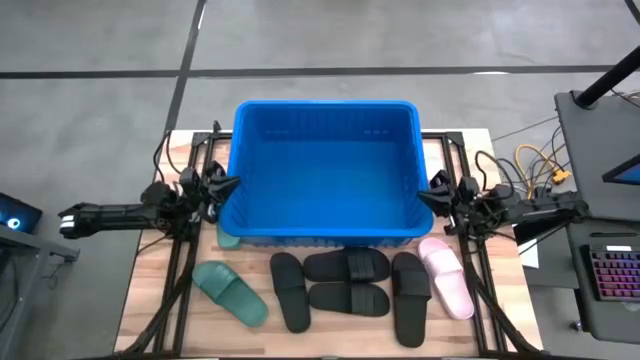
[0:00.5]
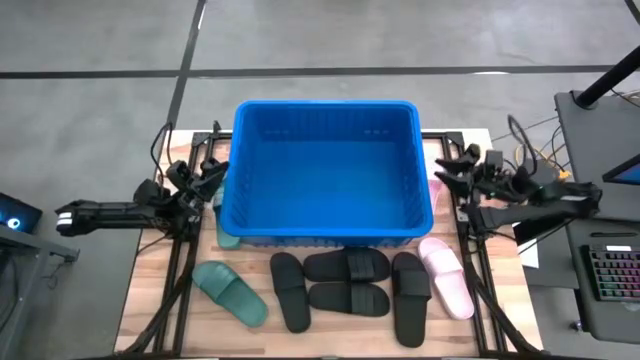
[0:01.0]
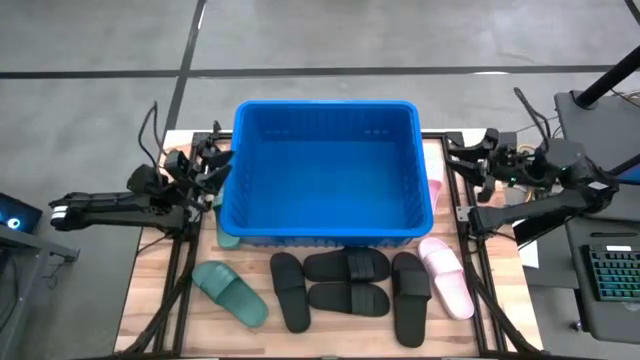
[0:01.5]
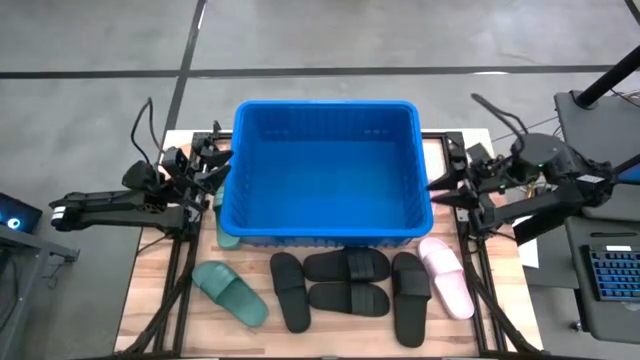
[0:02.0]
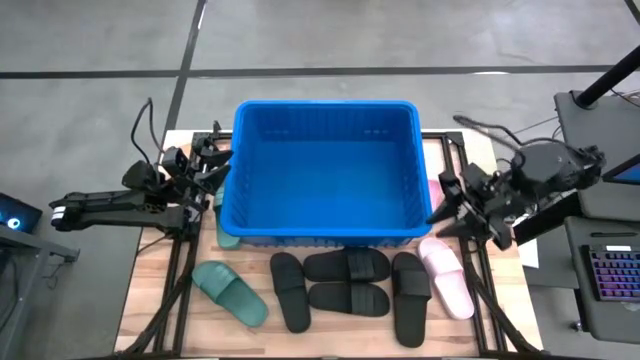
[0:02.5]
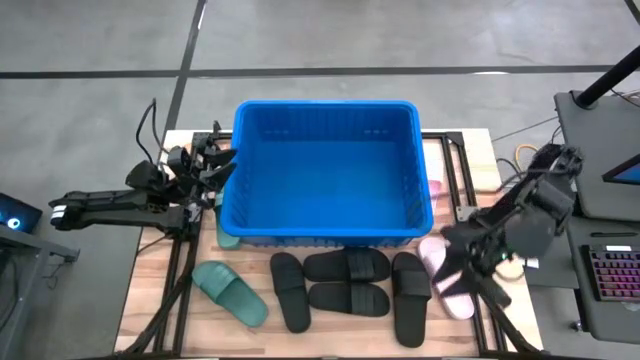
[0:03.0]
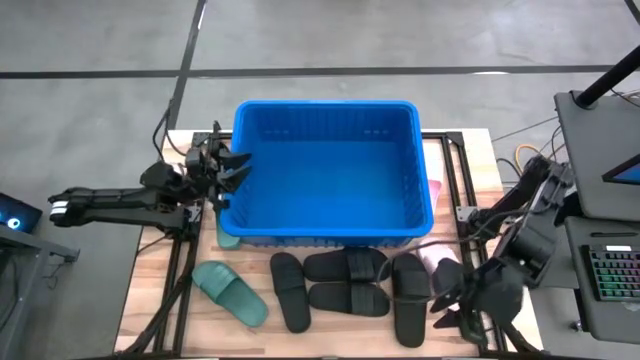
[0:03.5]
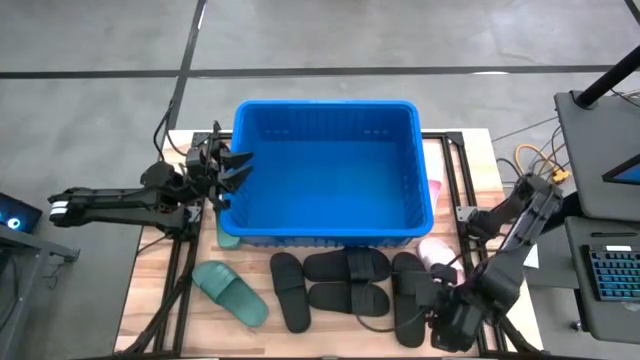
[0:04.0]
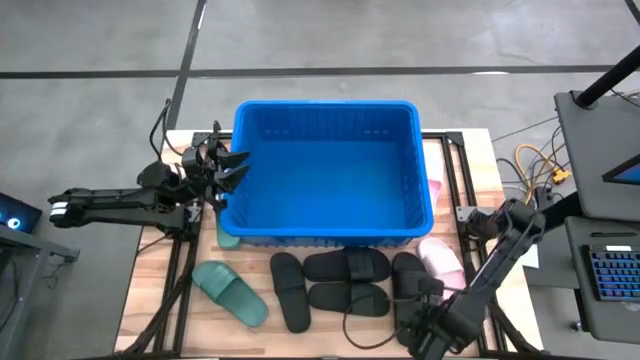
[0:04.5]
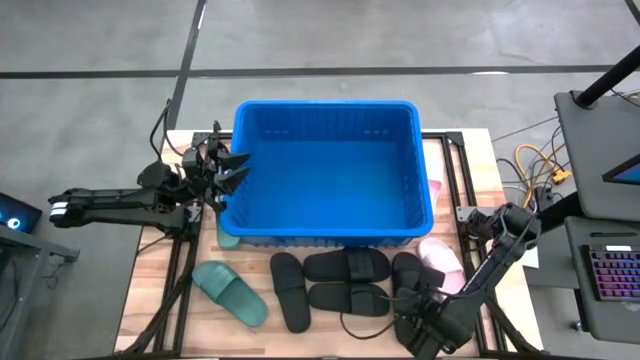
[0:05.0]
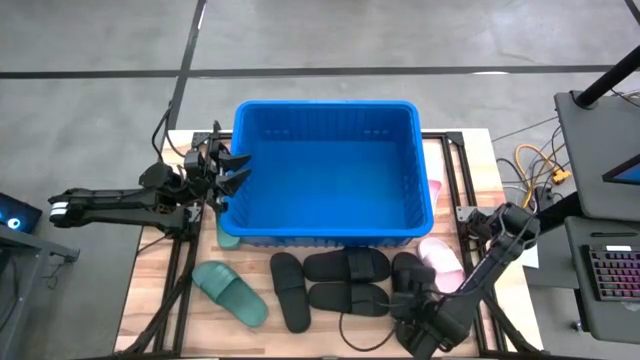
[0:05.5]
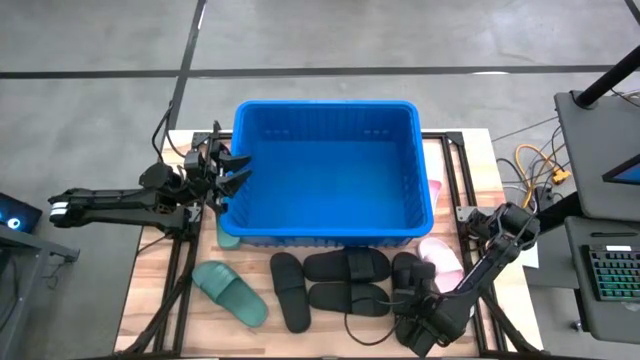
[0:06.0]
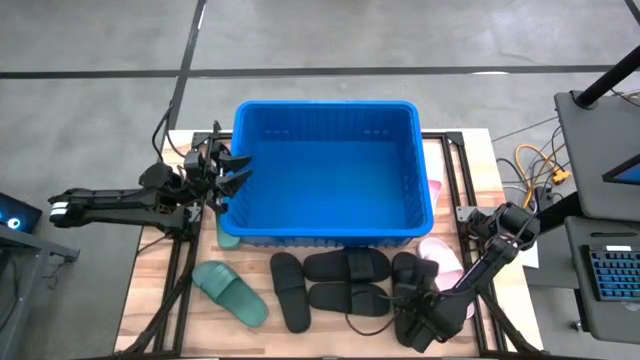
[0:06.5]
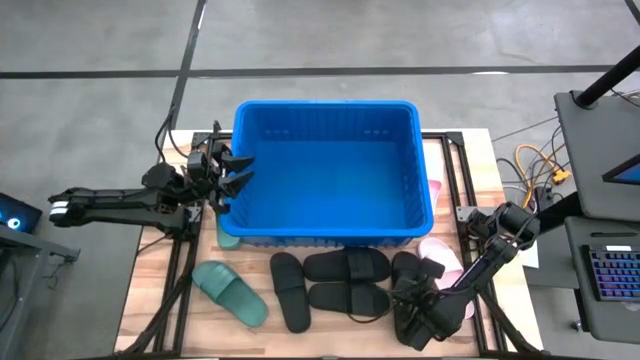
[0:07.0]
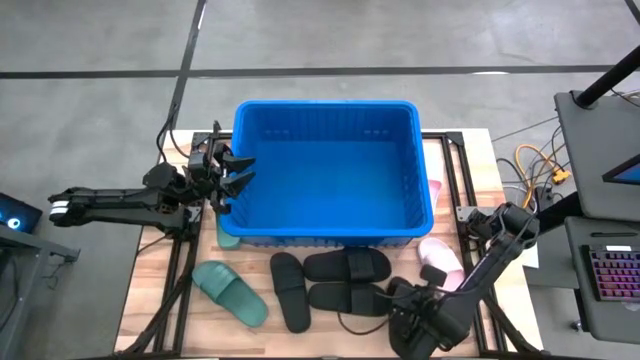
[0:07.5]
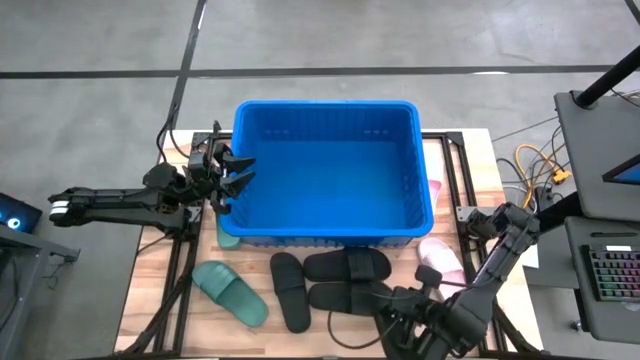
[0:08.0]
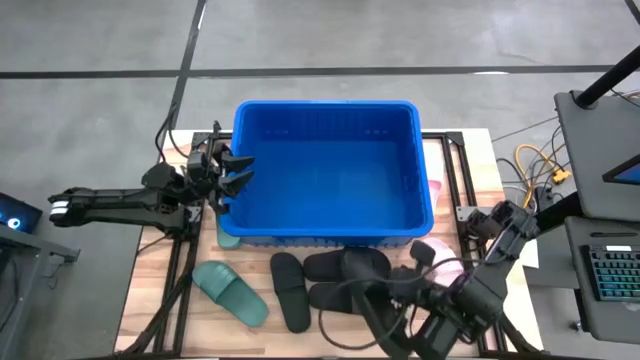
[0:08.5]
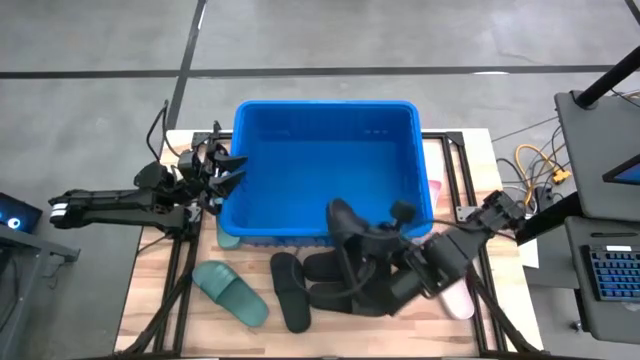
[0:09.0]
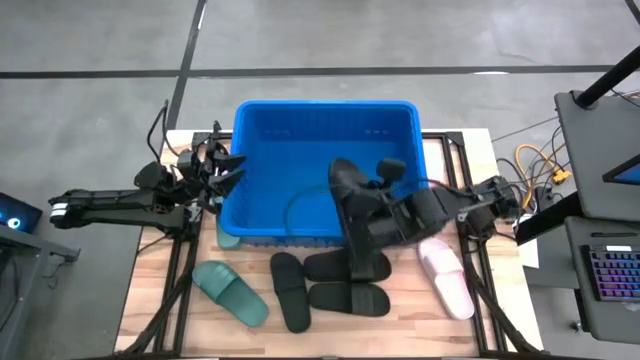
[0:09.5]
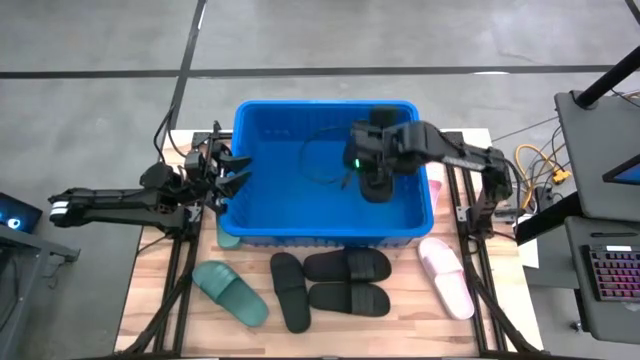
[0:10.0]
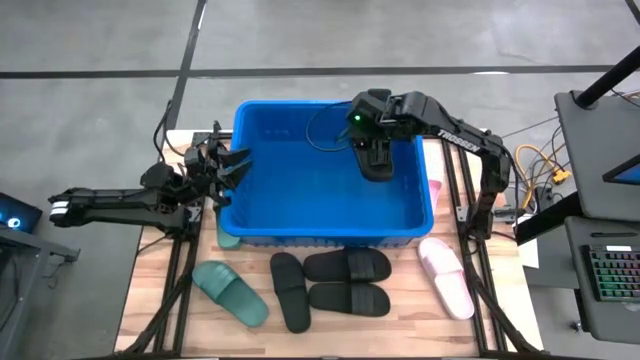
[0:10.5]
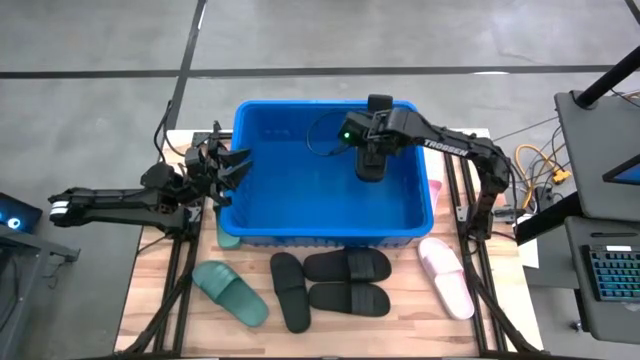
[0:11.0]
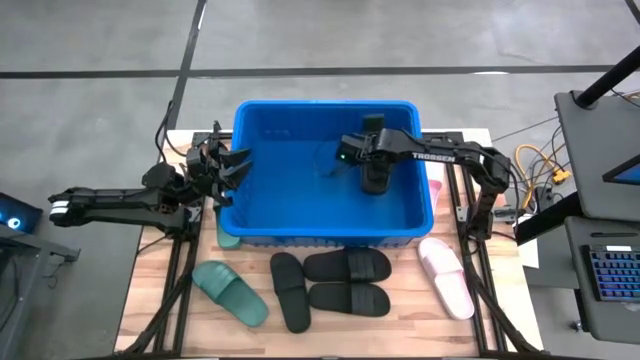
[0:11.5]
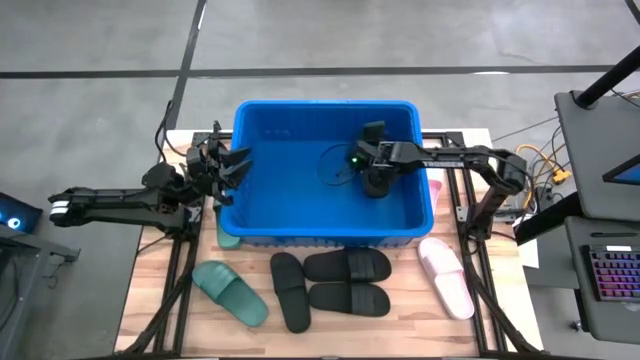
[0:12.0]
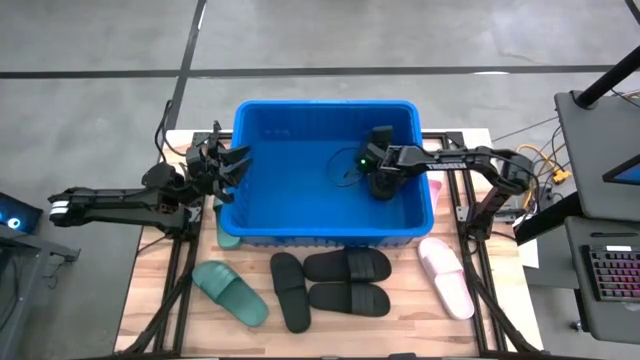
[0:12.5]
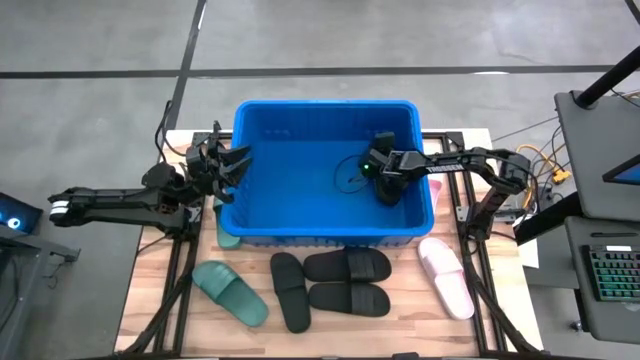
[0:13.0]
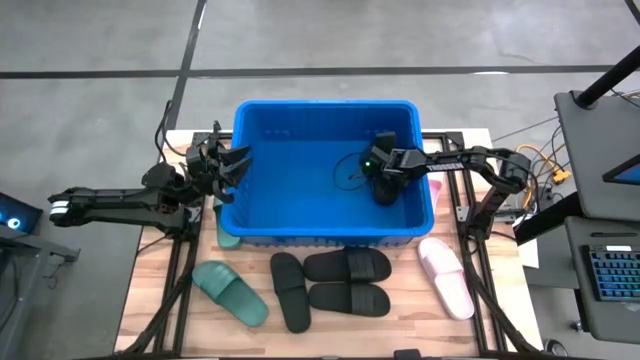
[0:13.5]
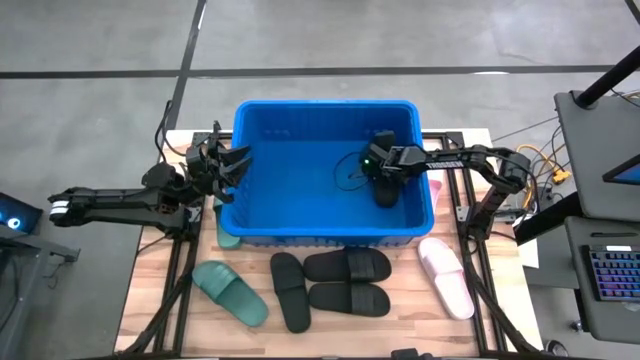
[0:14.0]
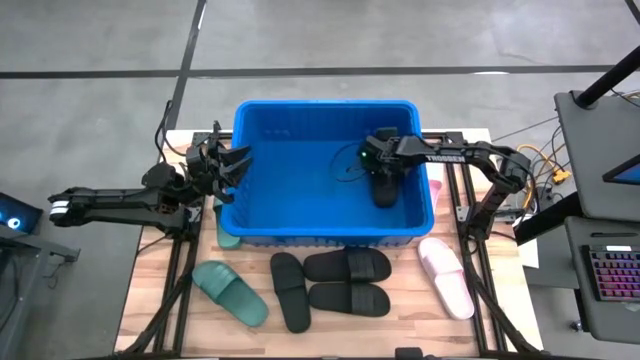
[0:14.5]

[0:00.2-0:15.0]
Task: Pick and place slides into bin
Put the black slide into the blue container
